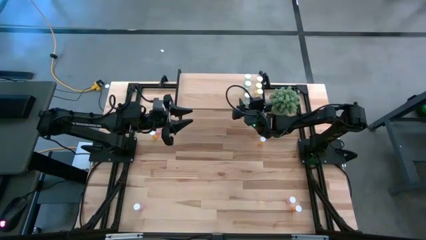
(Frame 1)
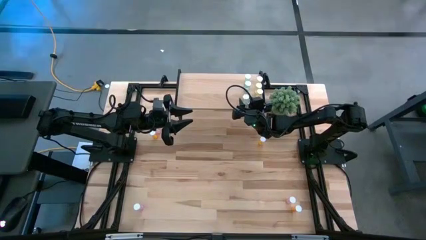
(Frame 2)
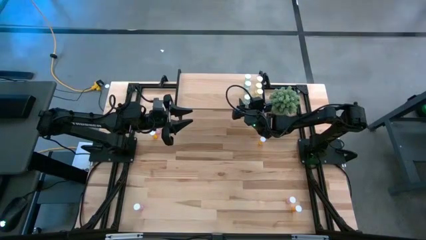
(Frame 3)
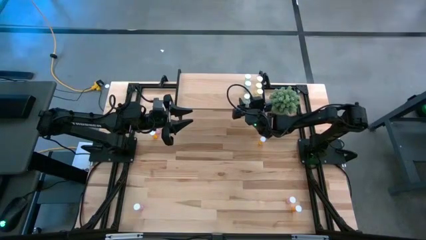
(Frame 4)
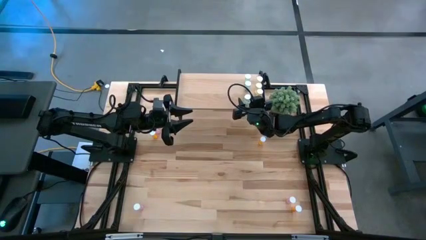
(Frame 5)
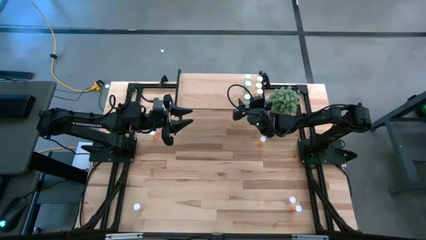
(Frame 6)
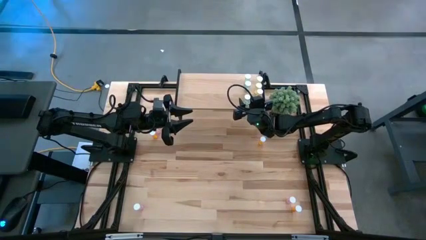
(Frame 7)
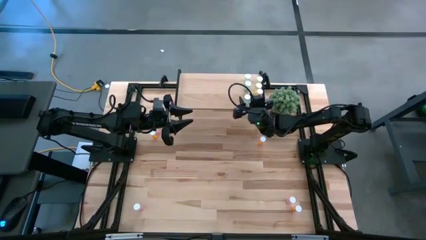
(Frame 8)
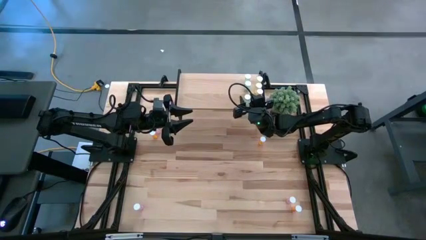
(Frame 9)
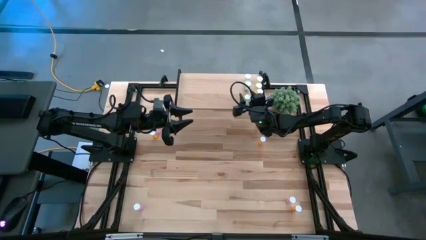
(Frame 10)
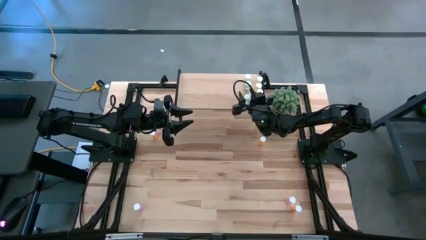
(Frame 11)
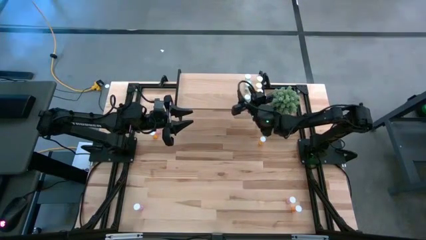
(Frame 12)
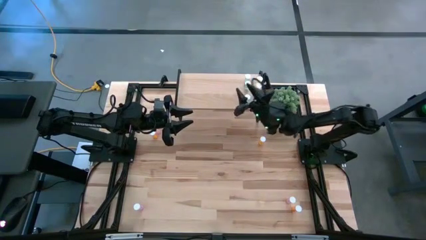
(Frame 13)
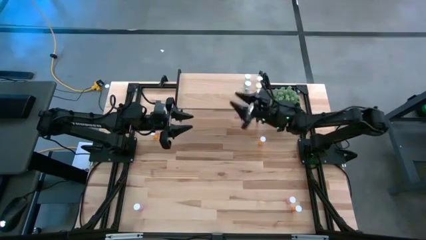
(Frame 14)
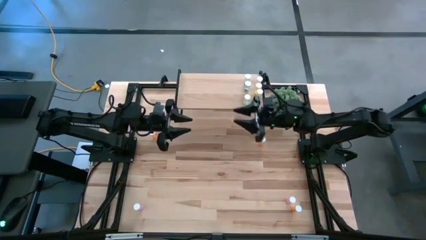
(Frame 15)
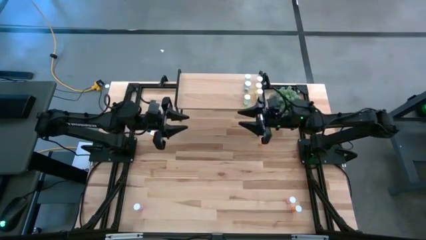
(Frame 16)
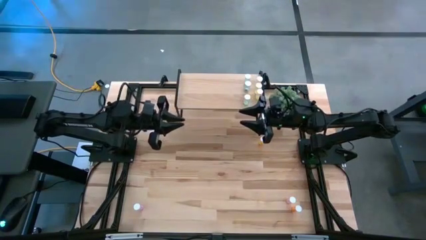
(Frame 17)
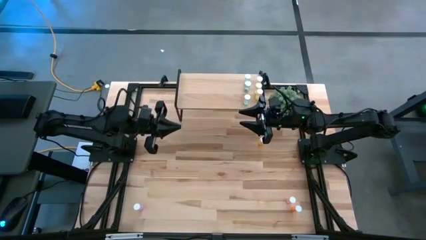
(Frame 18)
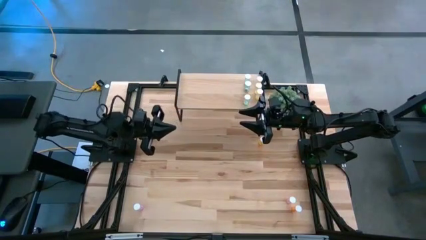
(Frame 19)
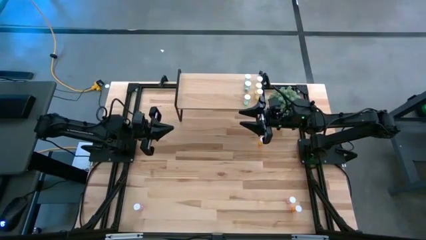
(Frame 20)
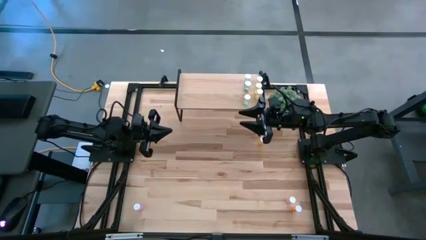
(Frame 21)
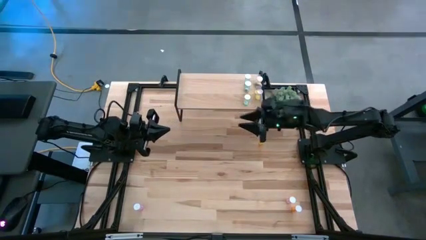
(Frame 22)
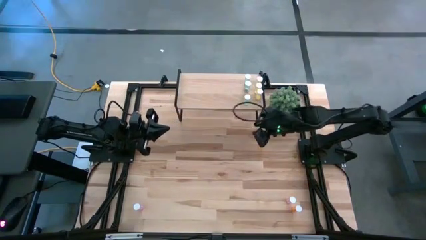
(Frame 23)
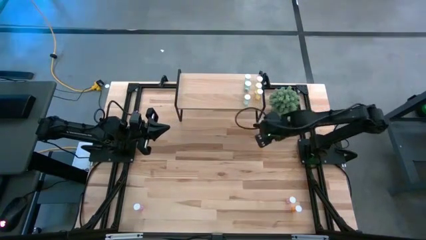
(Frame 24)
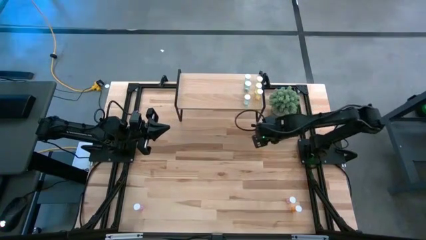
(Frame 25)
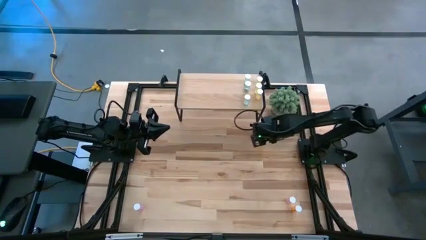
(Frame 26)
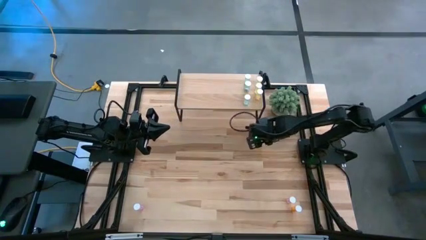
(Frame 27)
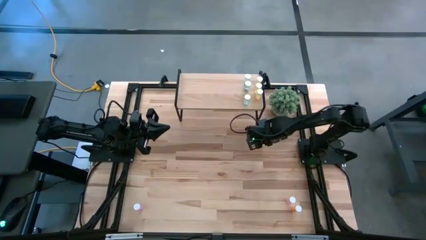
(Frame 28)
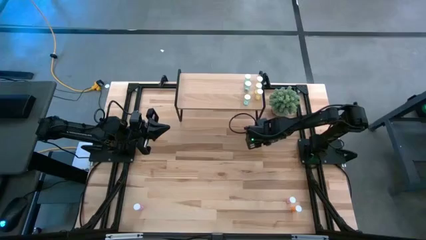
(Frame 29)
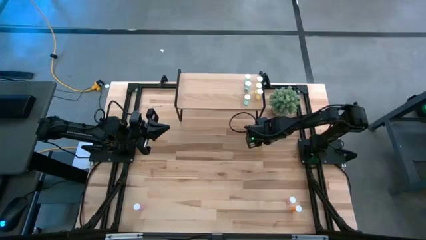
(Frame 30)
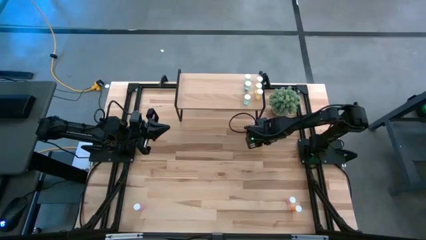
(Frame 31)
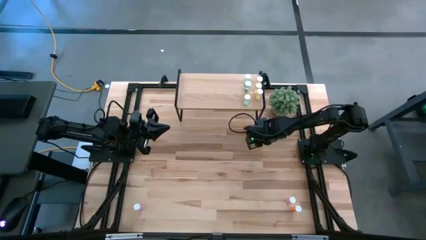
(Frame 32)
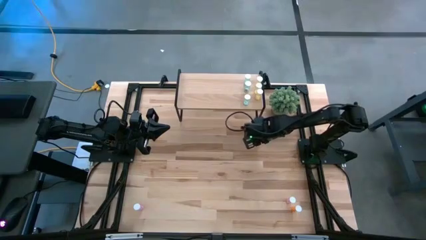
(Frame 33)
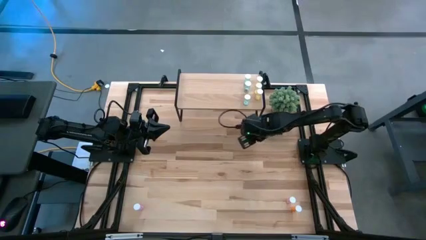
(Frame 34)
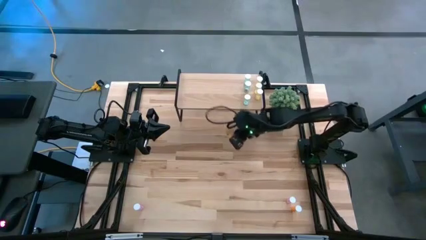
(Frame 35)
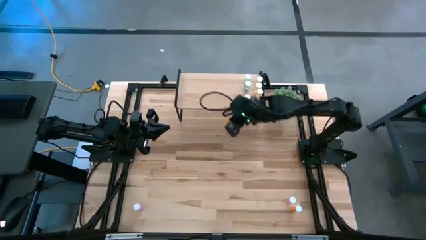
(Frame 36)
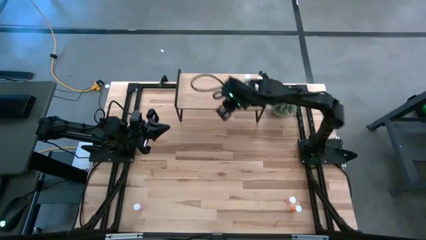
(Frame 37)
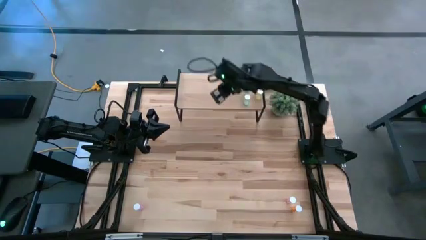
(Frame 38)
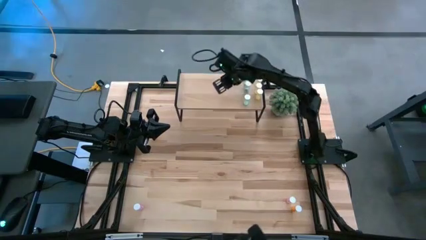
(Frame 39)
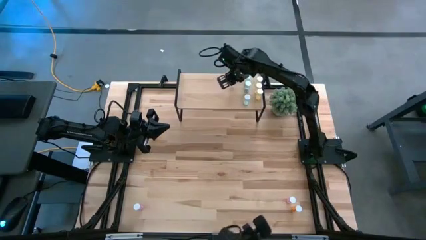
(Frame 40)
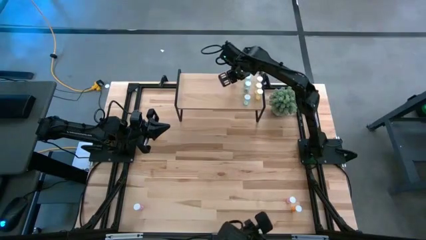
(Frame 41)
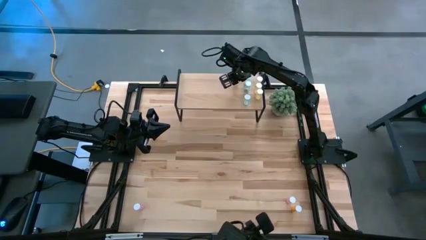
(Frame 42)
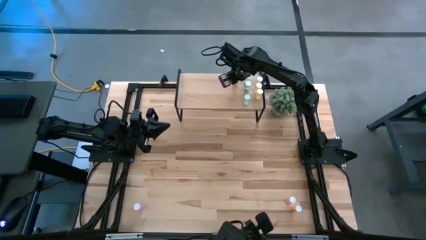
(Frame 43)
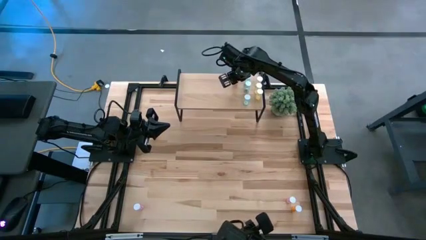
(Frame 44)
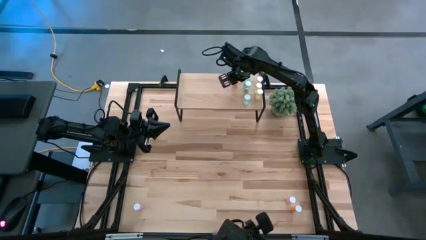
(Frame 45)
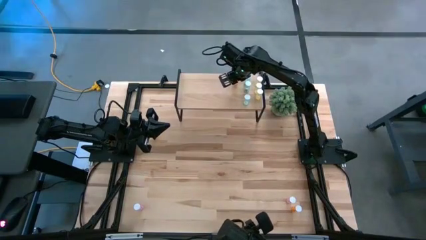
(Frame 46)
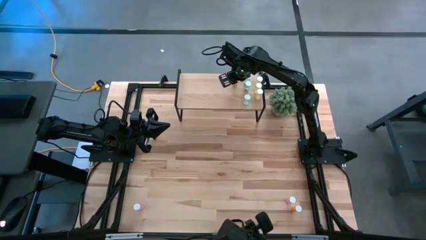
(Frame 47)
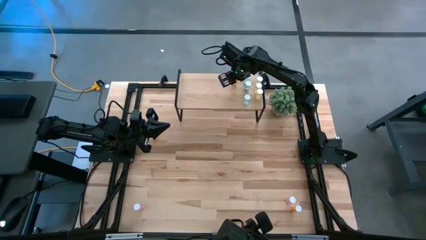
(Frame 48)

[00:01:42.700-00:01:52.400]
Task: Pick and place medicine bottles onto shelf by color
Put the top right orange pill bottle on the shelf
